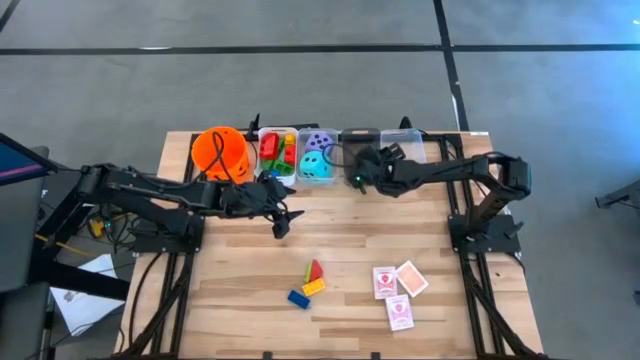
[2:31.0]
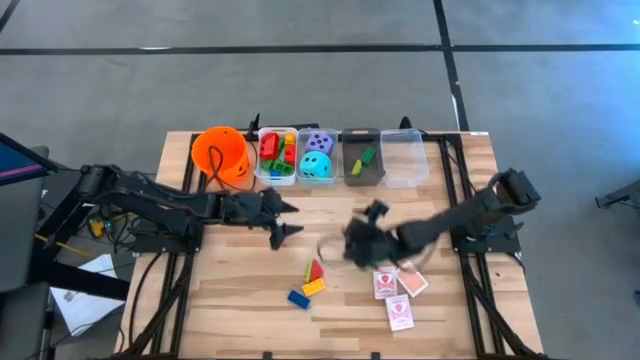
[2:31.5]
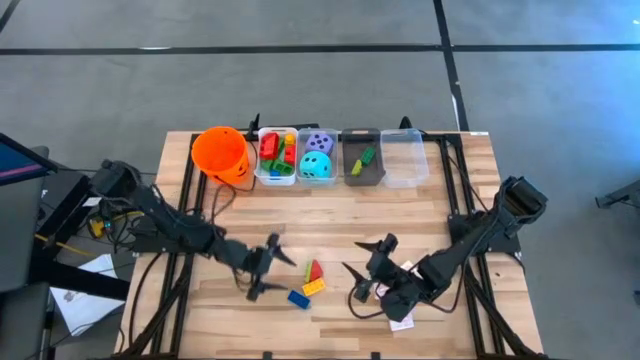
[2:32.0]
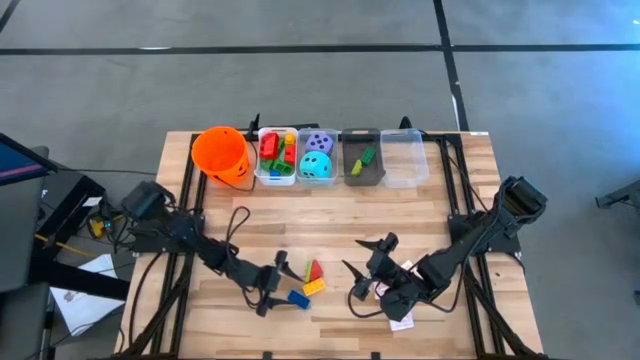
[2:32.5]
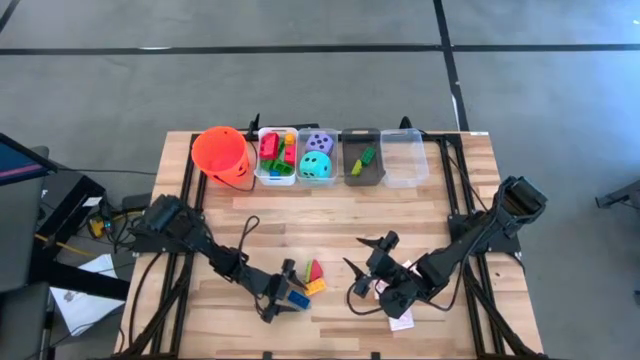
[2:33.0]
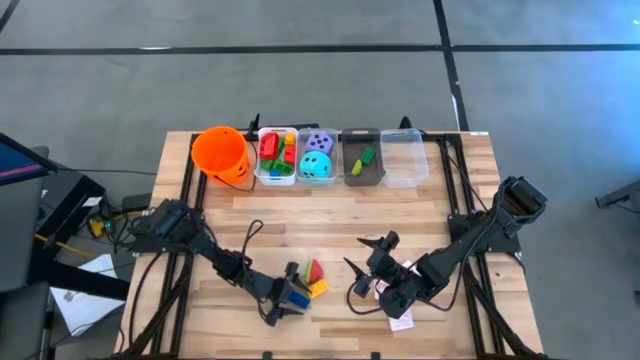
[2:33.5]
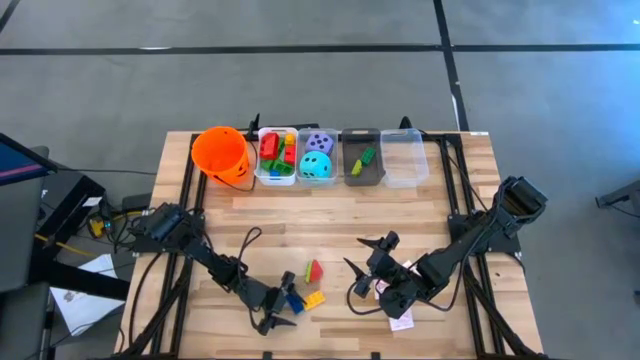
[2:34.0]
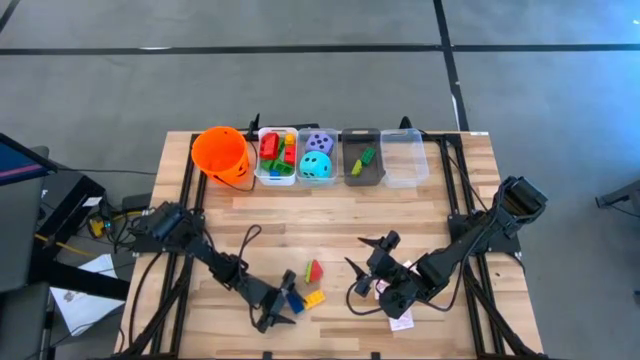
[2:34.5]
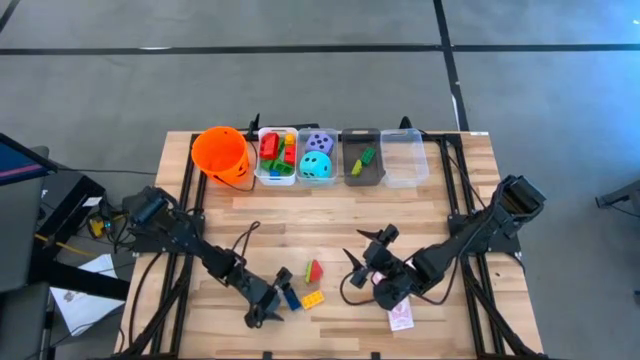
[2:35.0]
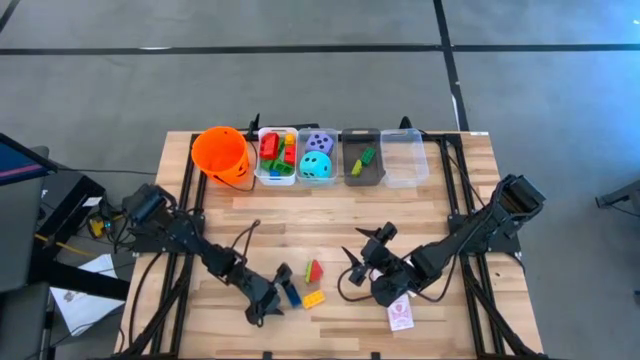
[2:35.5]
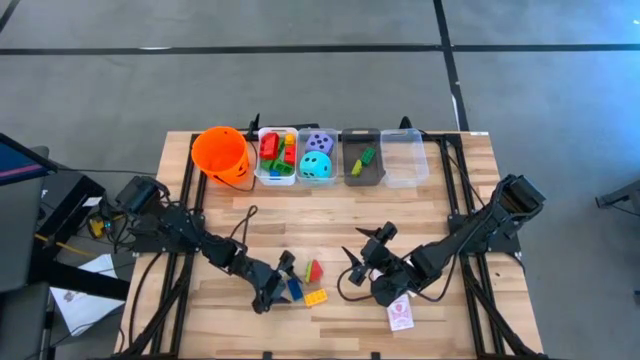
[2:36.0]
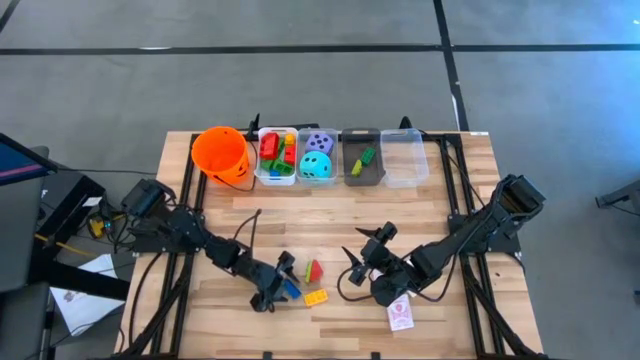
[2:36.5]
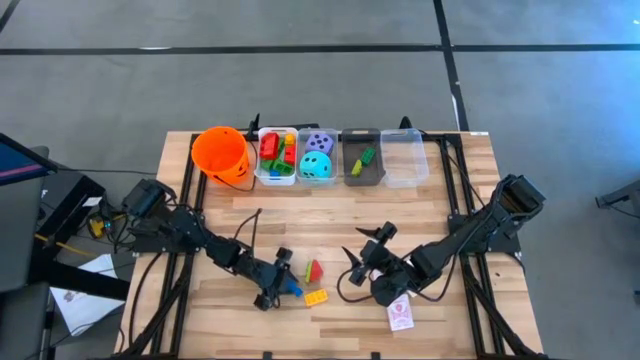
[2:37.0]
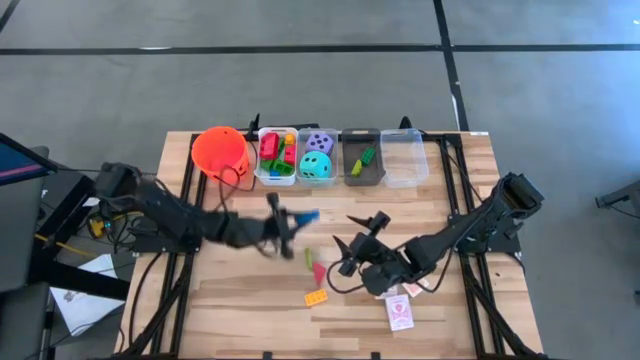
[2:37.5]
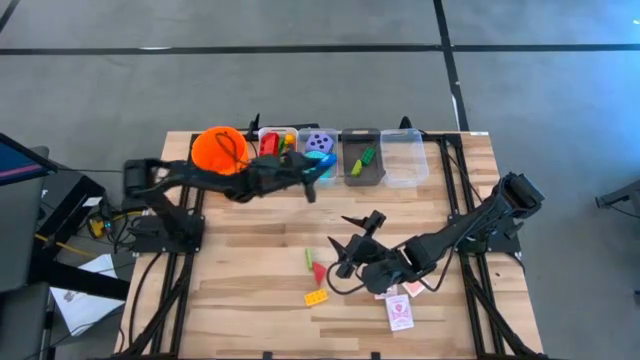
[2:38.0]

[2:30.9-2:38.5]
Task: Pick & Place Toys
Put the small blue game piece into the black bin

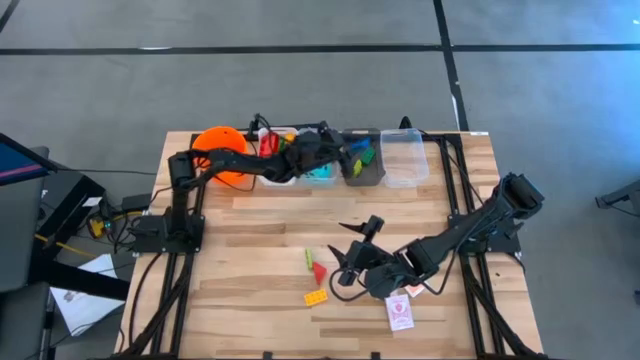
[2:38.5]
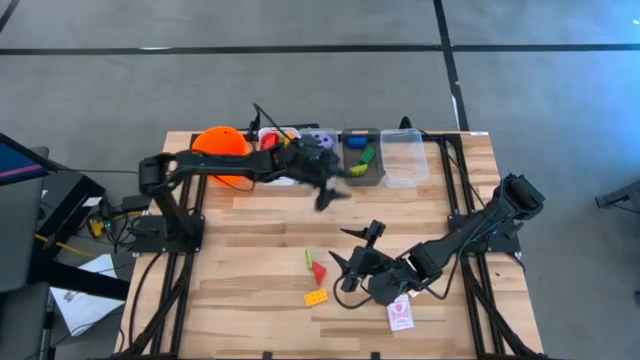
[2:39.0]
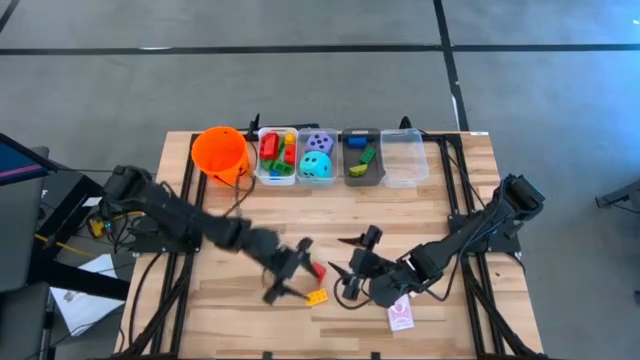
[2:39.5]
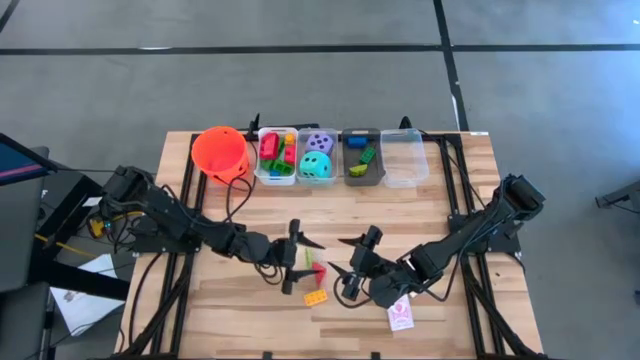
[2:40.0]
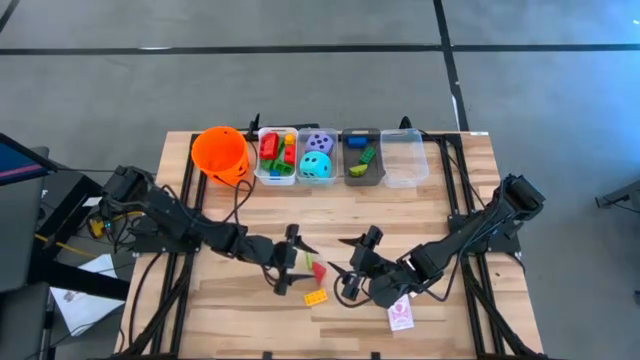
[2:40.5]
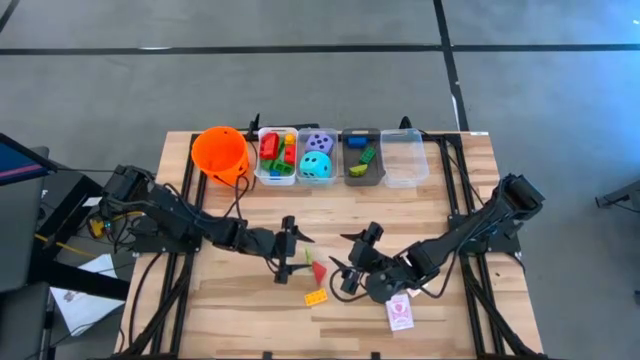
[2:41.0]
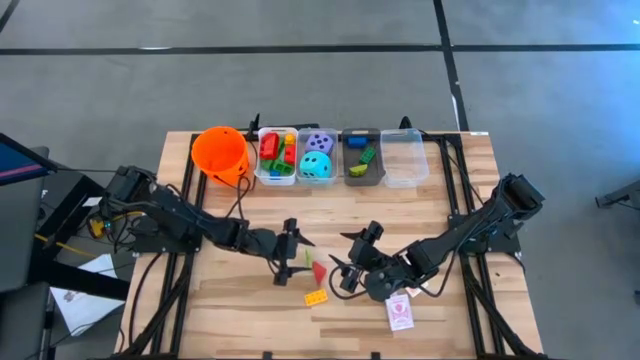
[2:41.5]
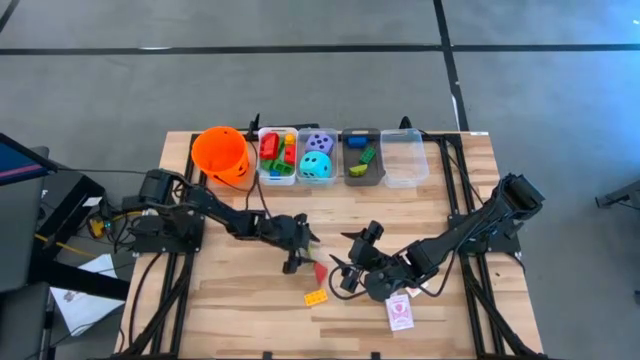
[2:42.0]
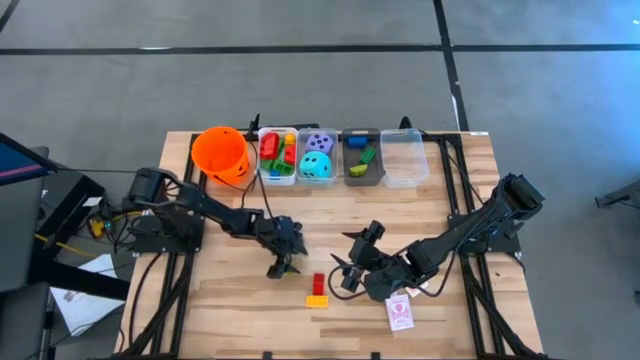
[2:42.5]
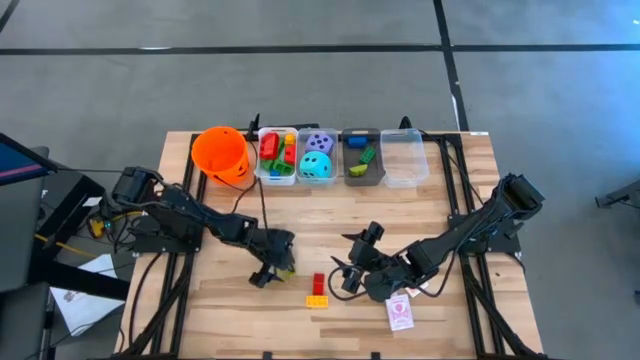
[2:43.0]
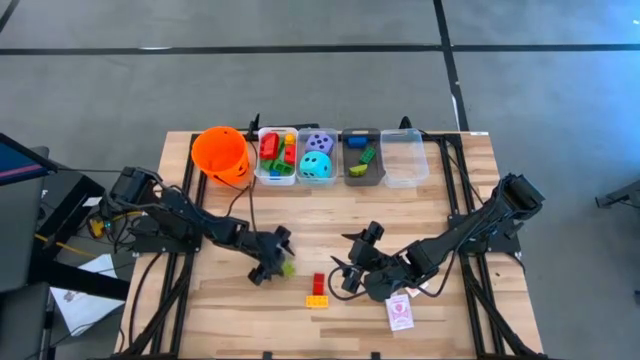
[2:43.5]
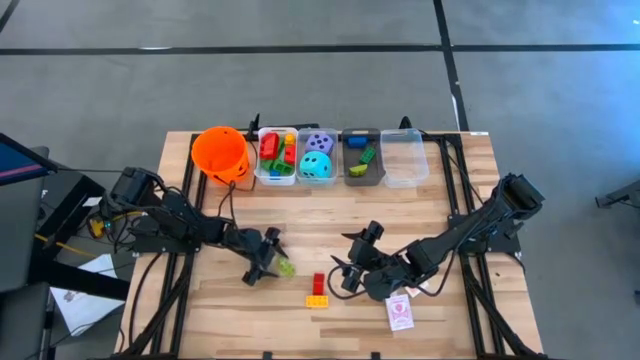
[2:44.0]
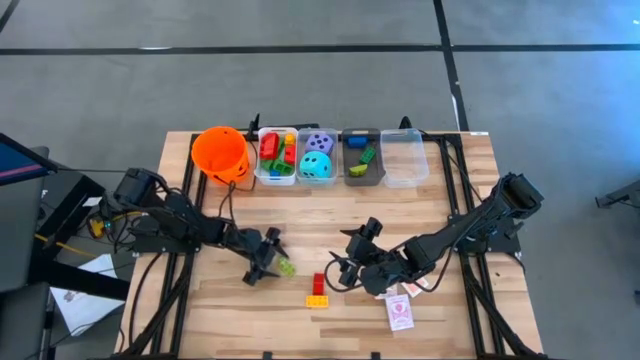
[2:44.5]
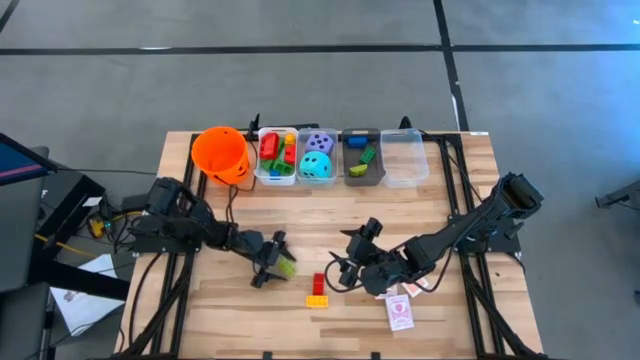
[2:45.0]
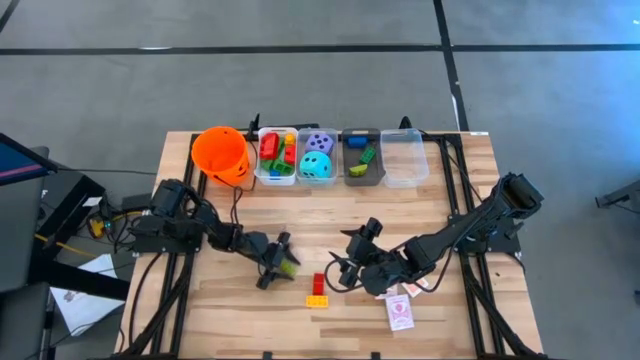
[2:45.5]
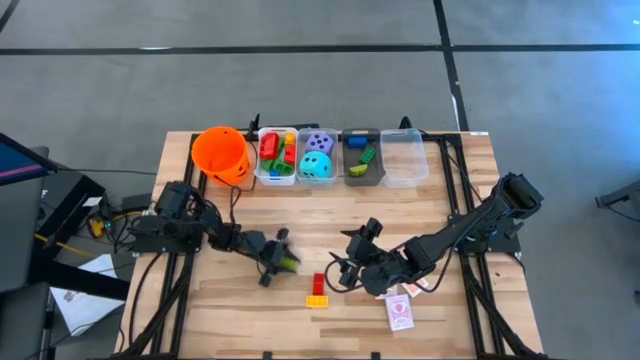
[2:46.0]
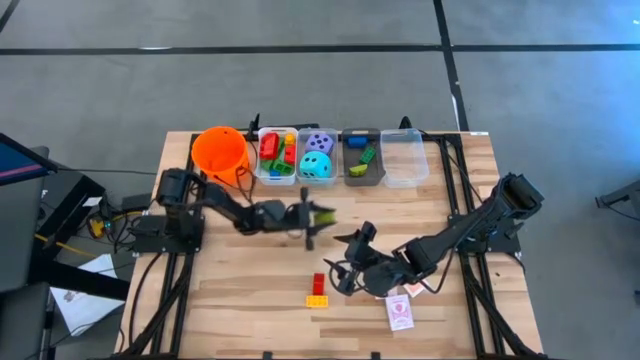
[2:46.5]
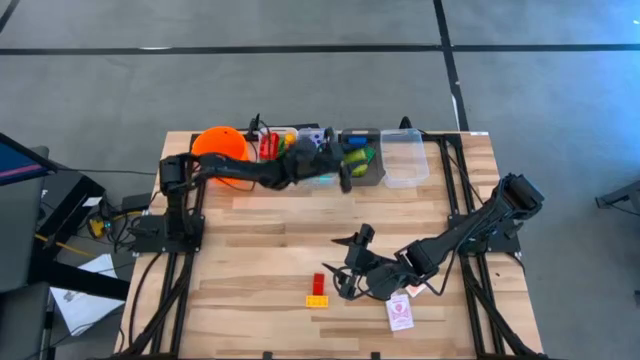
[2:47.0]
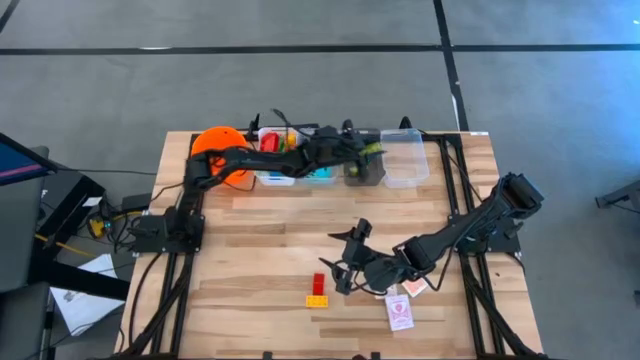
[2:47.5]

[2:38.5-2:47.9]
Put the small light green game piece into the black bin

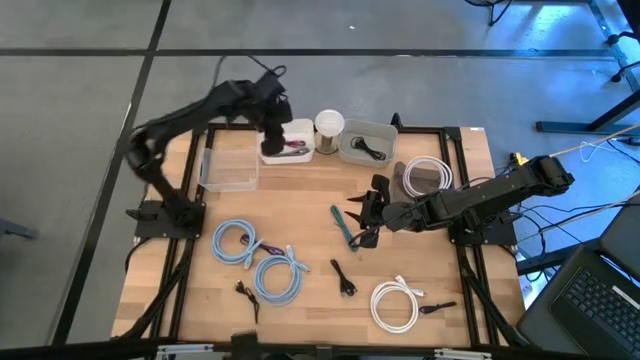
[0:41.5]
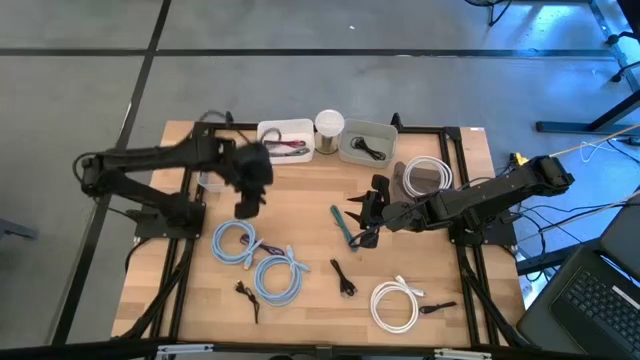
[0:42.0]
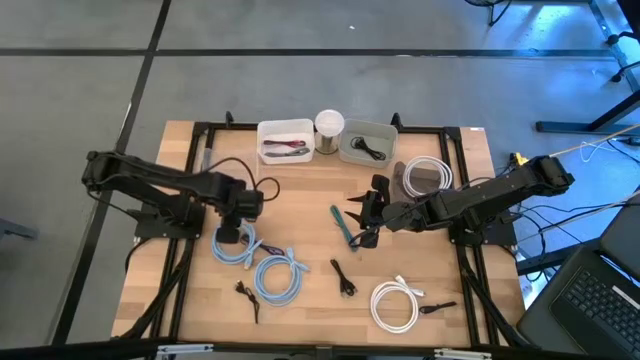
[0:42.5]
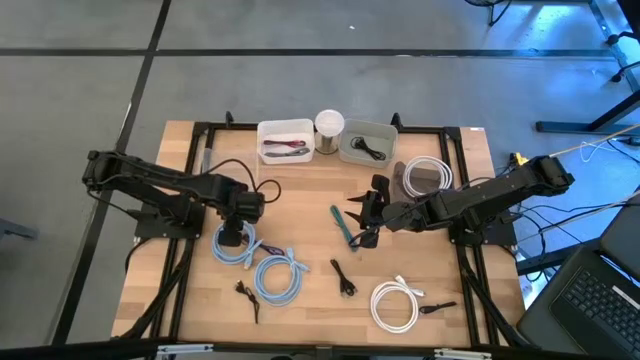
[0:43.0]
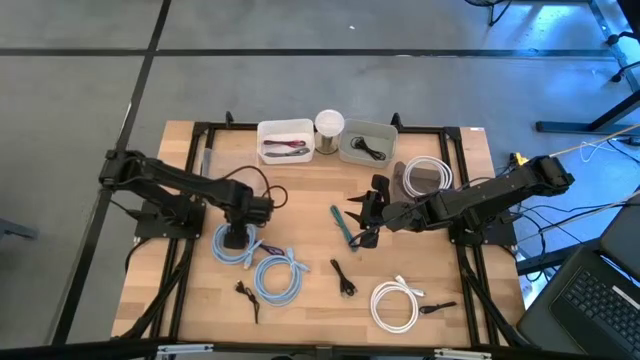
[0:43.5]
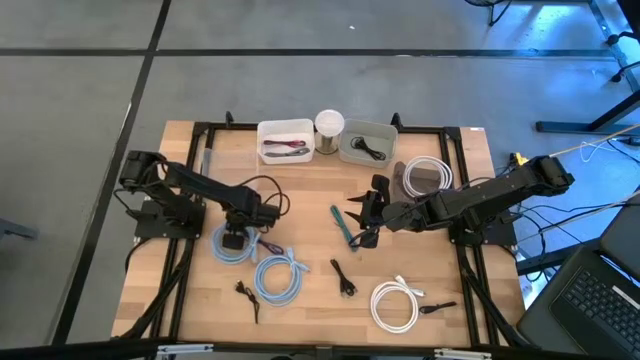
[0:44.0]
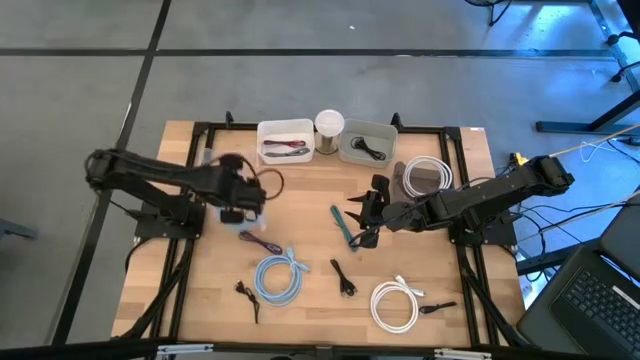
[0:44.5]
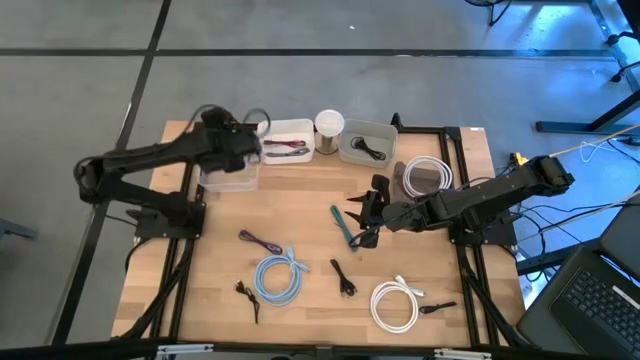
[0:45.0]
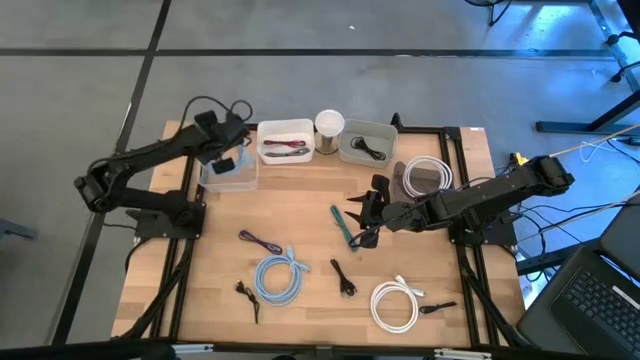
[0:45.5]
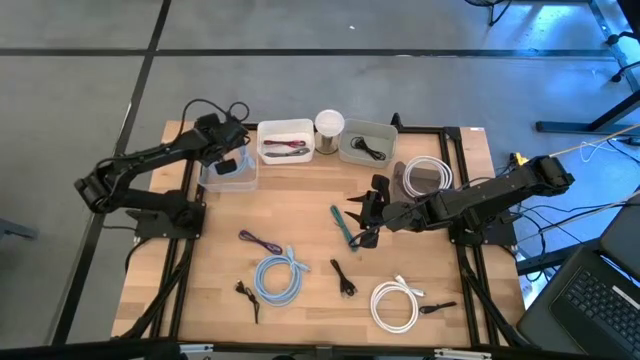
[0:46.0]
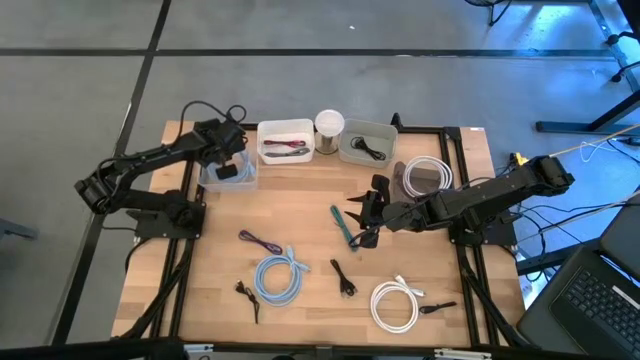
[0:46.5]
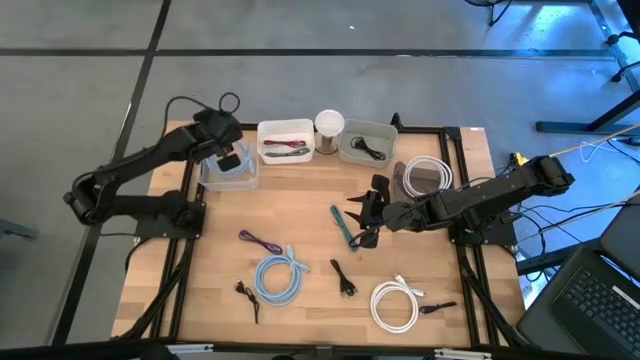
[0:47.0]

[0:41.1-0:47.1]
Task: Pick & Place USB Port
Put the blue HDMI cable into the transparent bin
